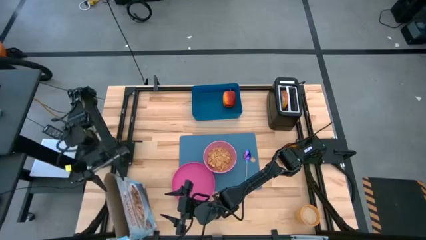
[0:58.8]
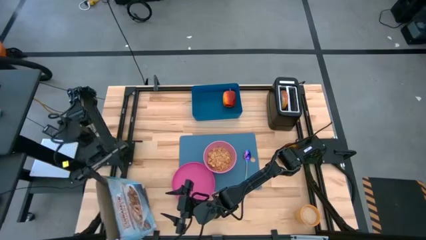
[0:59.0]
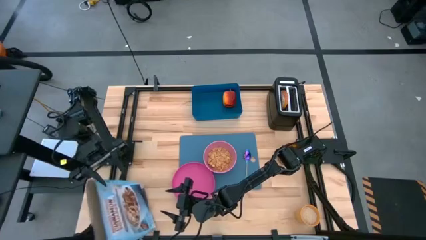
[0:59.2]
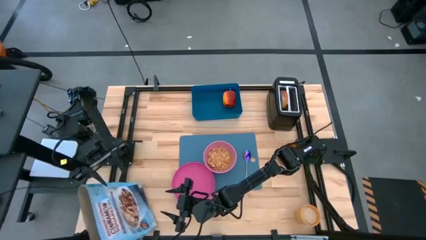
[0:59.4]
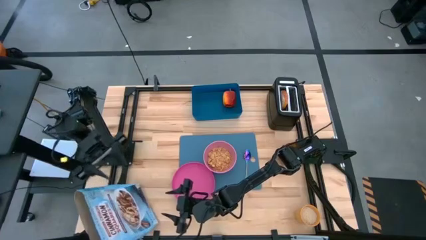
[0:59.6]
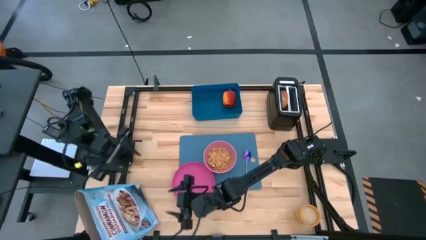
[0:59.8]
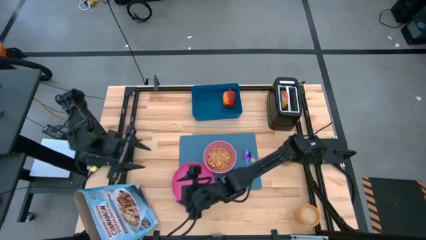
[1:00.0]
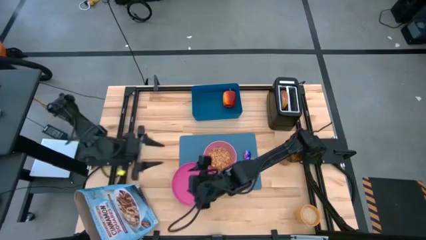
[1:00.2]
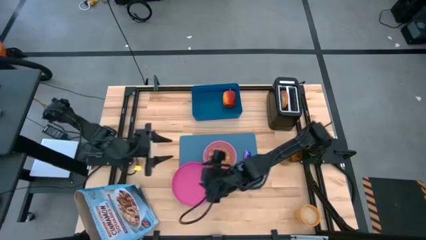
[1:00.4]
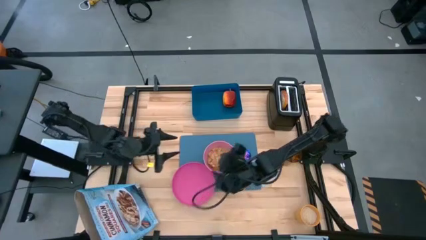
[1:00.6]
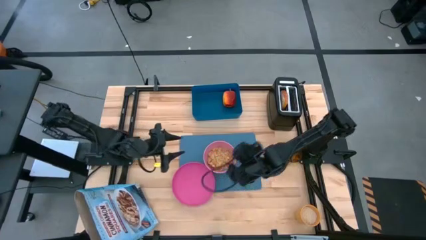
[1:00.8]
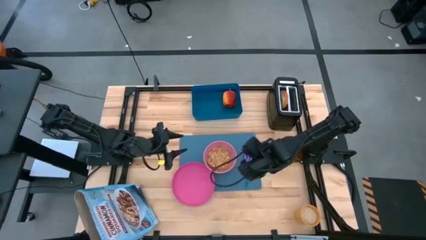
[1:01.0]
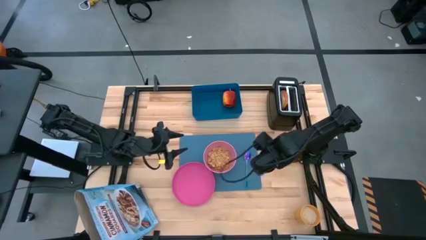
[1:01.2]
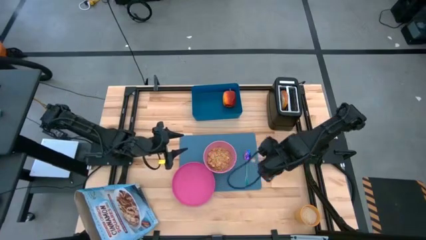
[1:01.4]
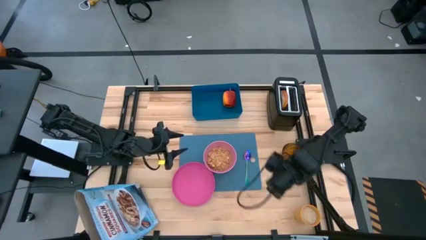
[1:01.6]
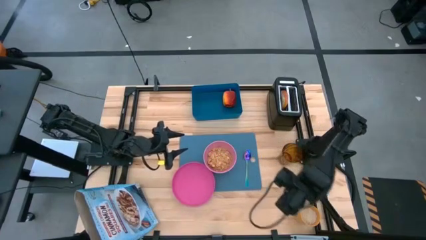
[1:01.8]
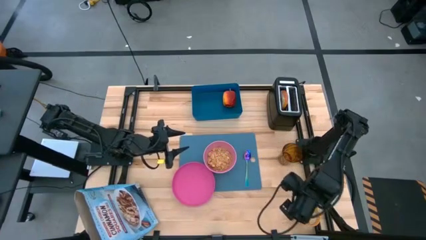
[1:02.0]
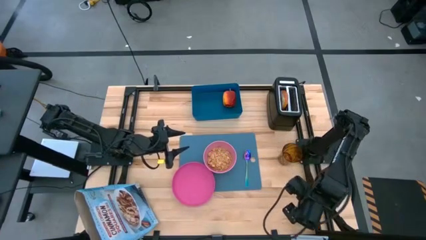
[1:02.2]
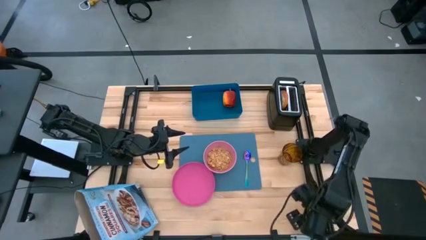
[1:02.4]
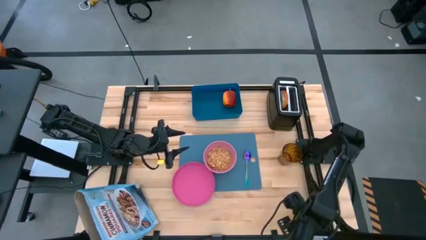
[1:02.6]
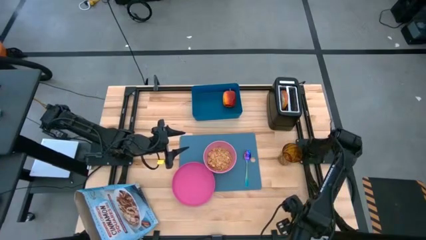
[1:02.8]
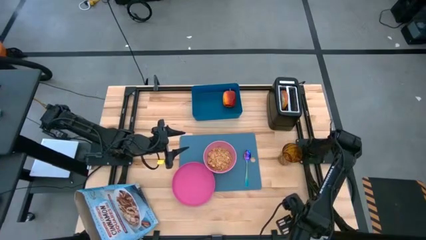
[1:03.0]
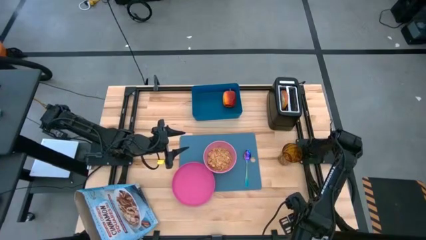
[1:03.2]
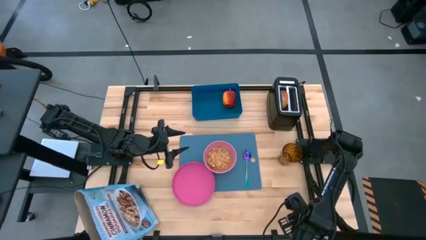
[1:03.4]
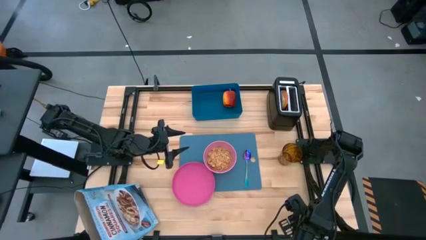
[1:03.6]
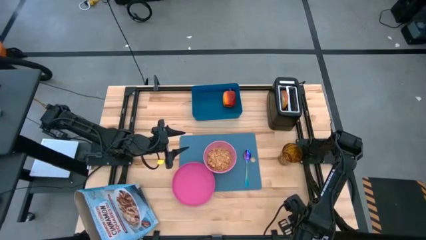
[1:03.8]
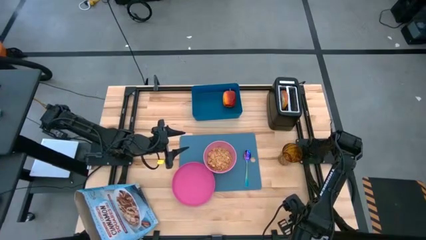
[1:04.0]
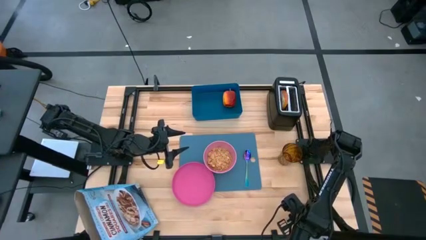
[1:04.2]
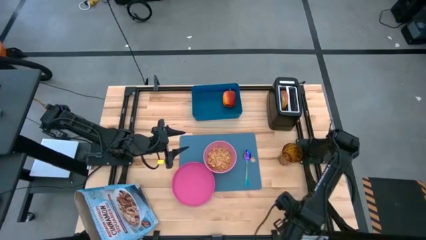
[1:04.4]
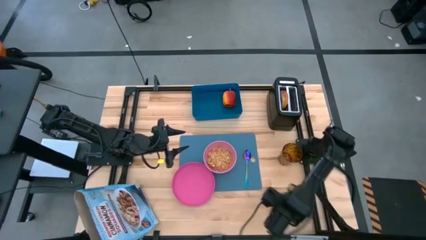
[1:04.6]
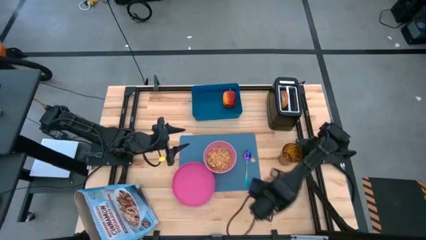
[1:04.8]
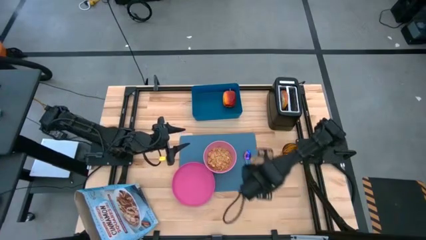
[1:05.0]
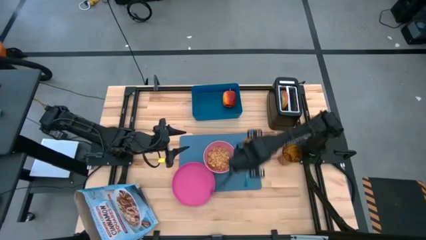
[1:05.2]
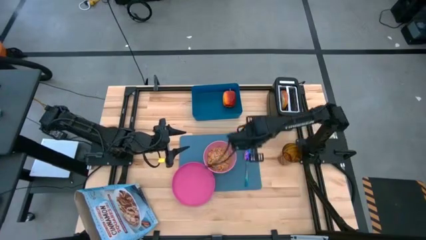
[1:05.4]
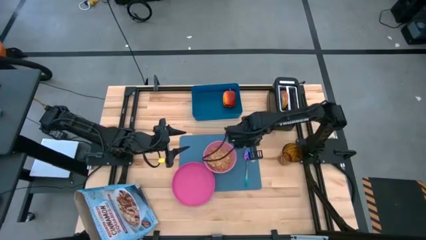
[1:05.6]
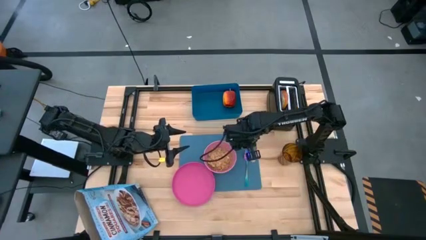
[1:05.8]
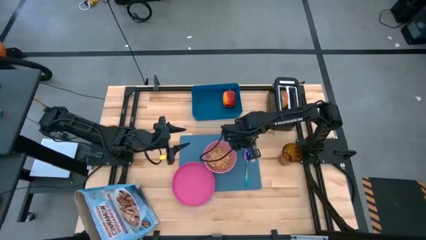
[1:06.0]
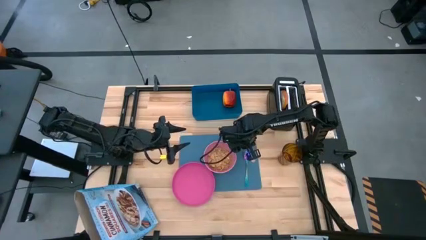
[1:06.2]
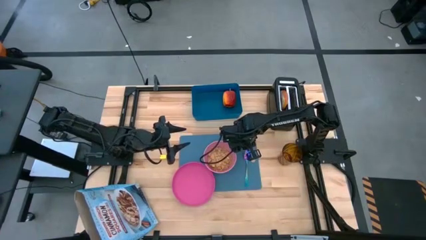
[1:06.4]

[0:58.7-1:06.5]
Task: Arrange a breakfast setting
Put the yellow cup to the top right of the pink bowl

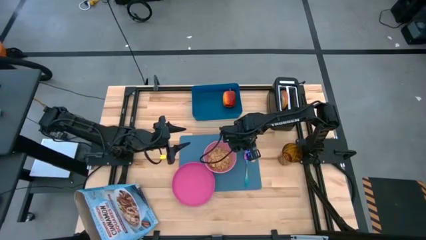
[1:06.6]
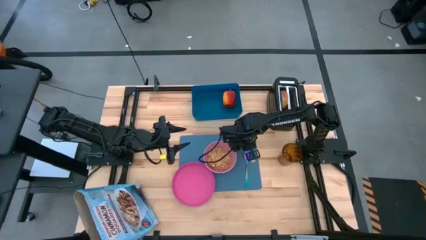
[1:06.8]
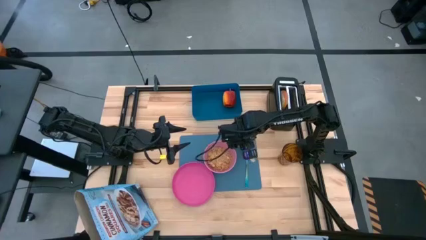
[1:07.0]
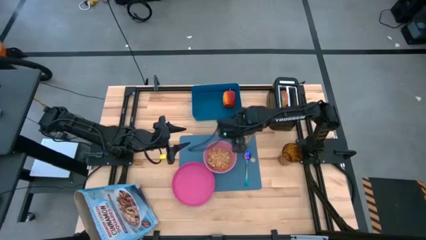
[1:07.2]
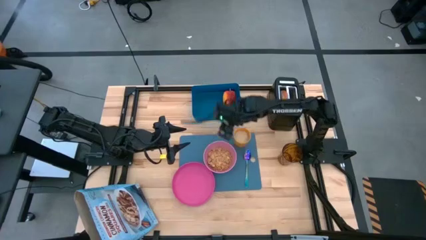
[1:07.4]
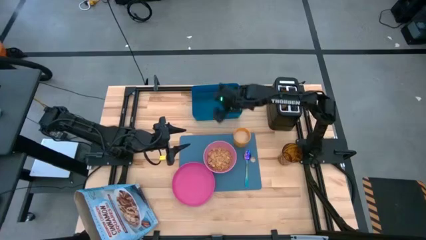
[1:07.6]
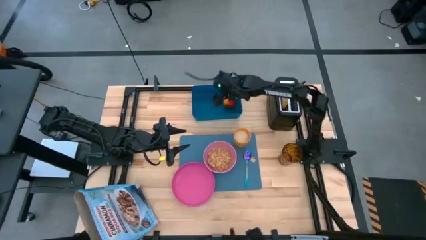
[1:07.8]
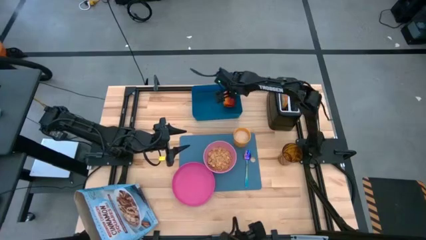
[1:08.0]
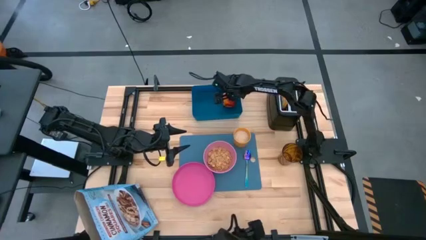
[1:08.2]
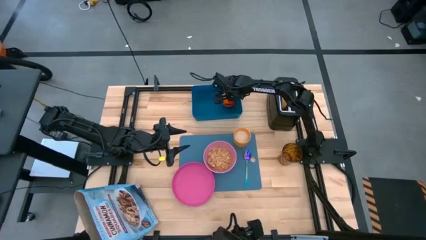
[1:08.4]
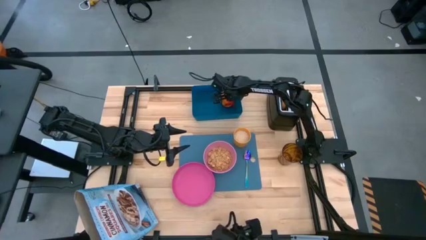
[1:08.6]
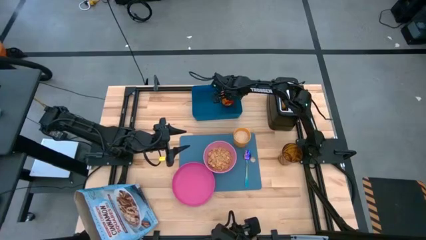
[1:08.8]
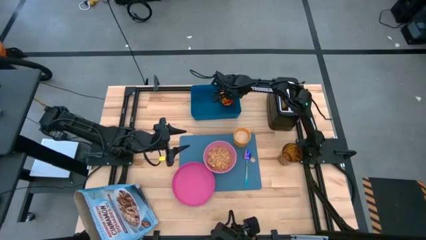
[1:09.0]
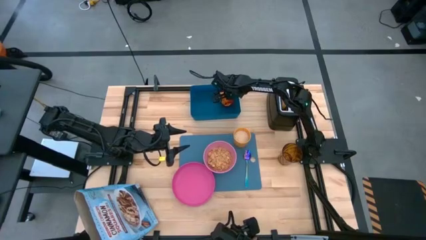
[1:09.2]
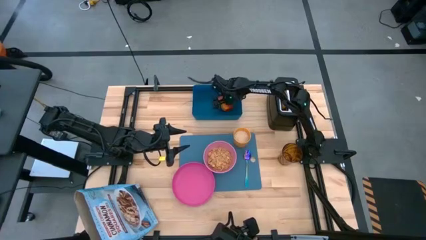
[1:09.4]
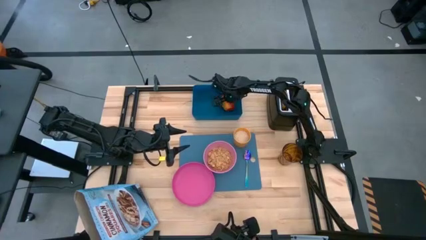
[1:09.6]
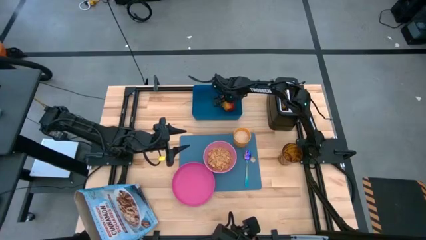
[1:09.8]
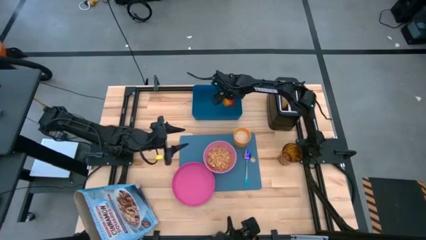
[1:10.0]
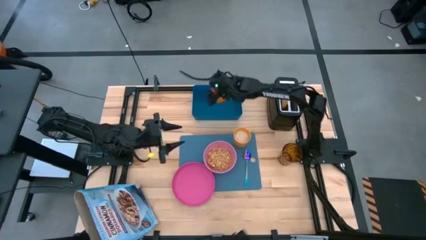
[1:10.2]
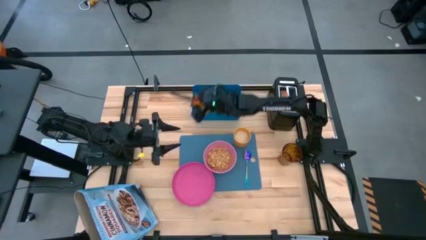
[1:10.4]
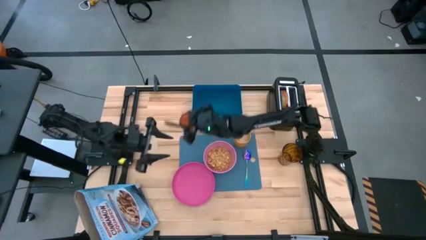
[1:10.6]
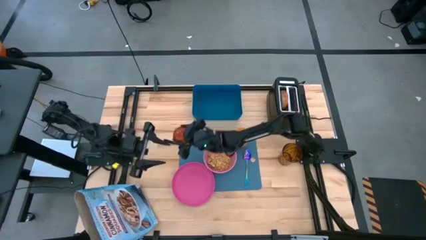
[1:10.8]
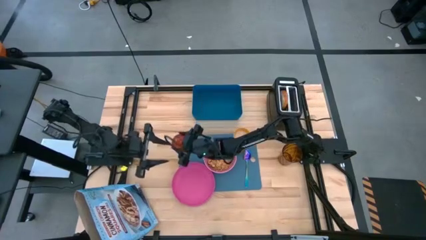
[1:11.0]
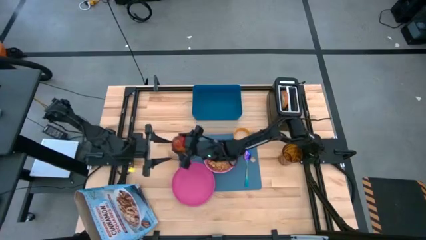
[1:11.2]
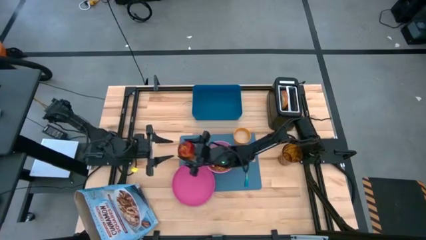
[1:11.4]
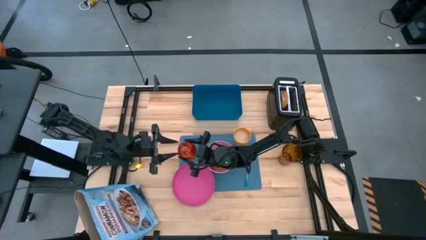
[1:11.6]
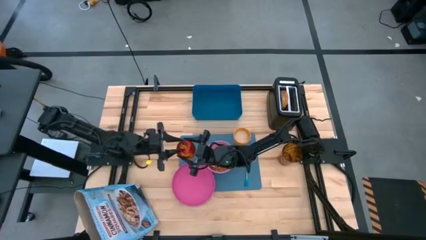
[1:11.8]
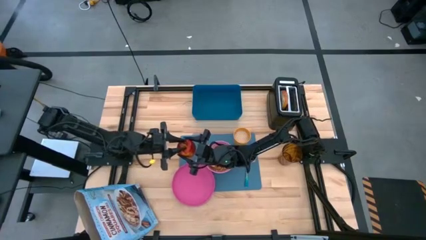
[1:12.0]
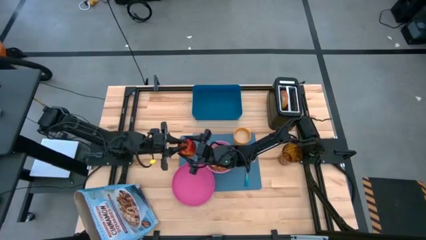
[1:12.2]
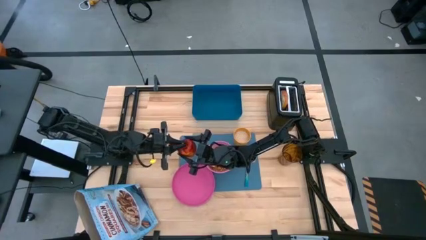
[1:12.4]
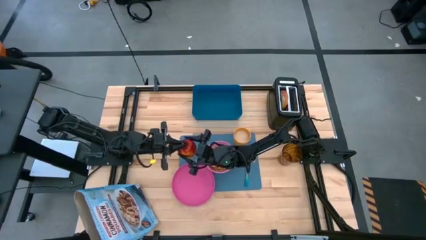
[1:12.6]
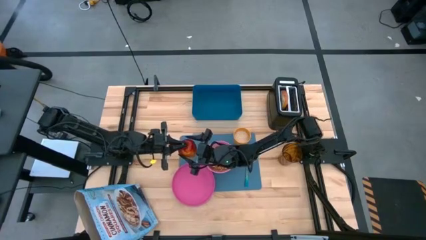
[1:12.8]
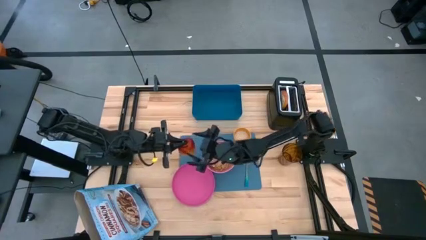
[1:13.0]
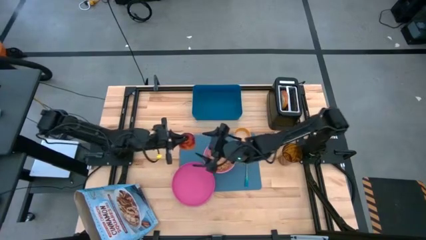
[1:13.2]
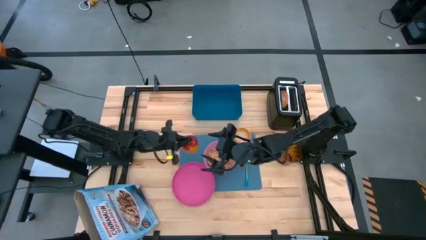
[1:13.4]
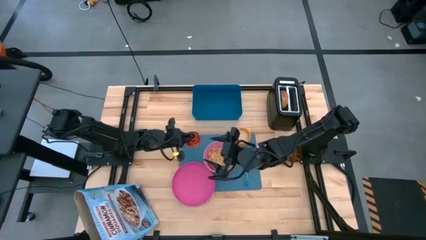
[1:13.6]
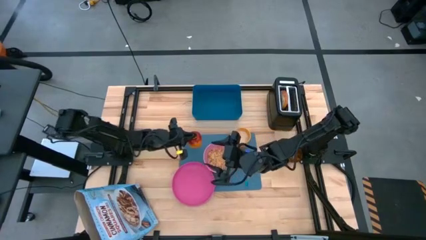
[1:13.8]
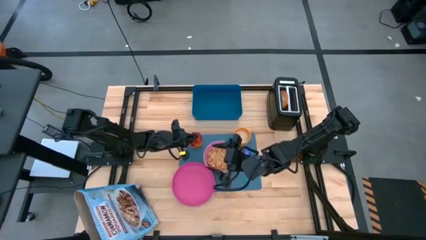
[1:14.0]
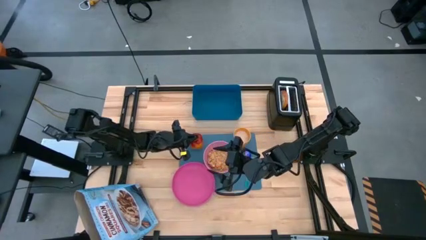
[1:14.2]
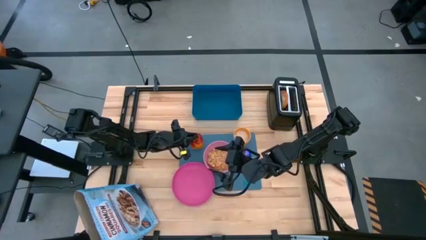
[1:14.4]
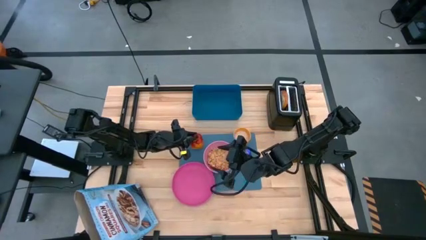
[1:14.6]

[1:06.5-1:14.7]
Put the apple to the top left of the pink bowl on the blue table mat
